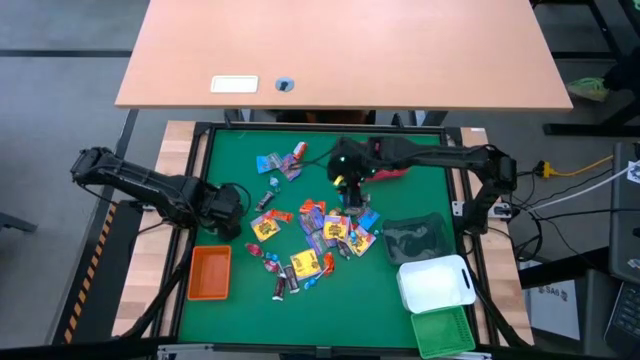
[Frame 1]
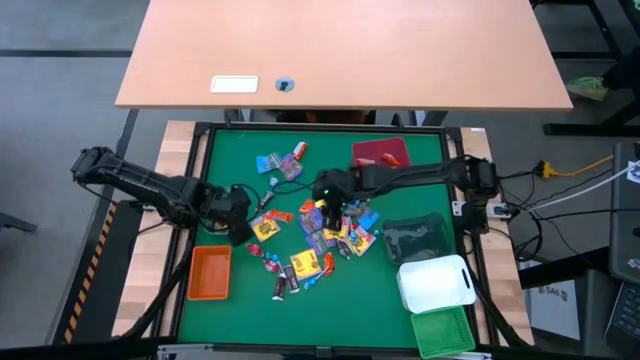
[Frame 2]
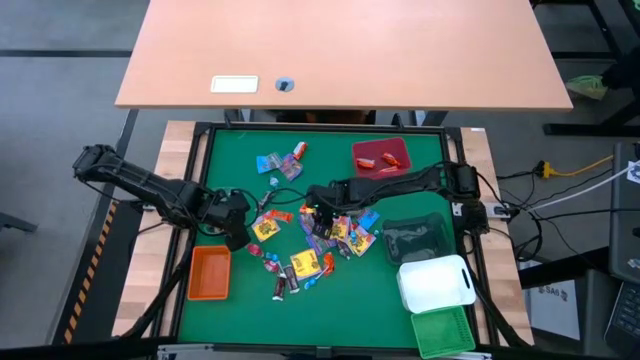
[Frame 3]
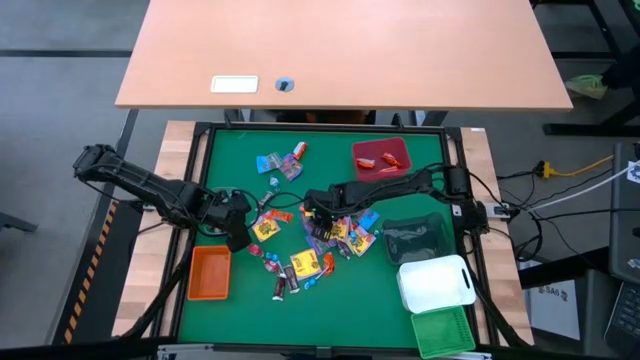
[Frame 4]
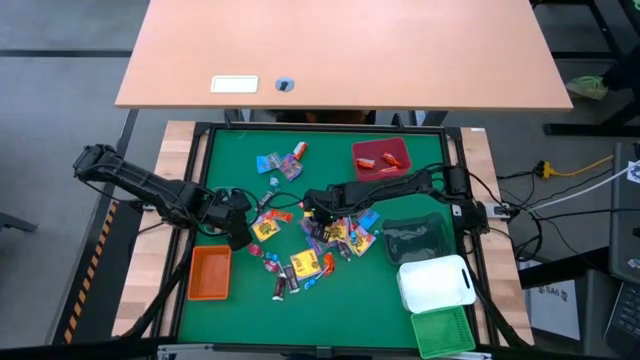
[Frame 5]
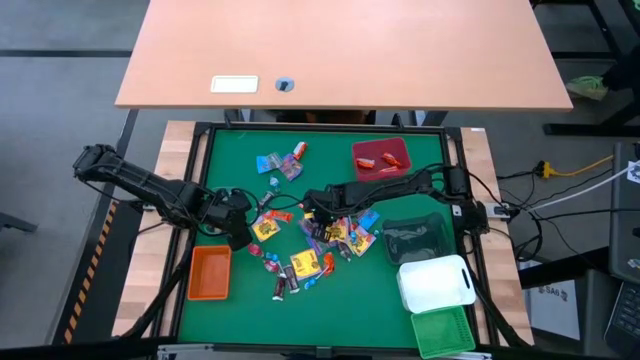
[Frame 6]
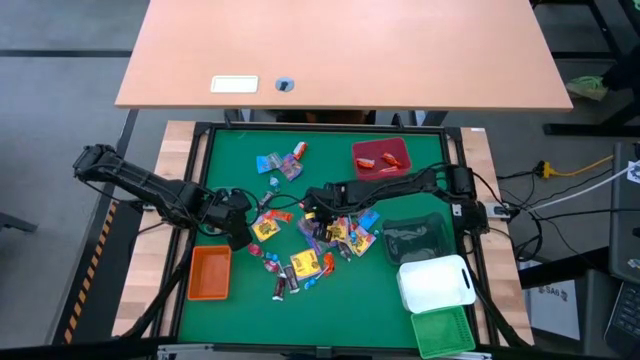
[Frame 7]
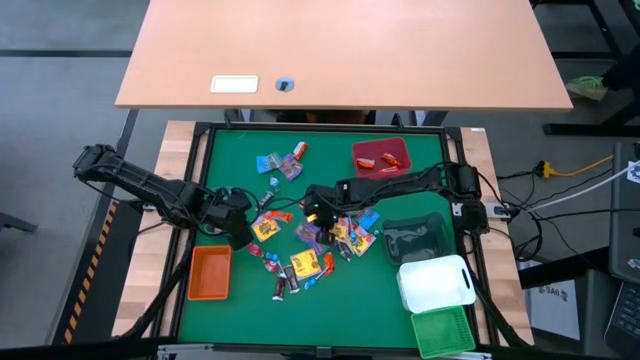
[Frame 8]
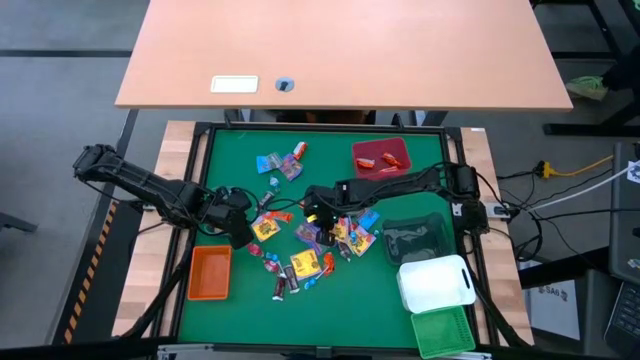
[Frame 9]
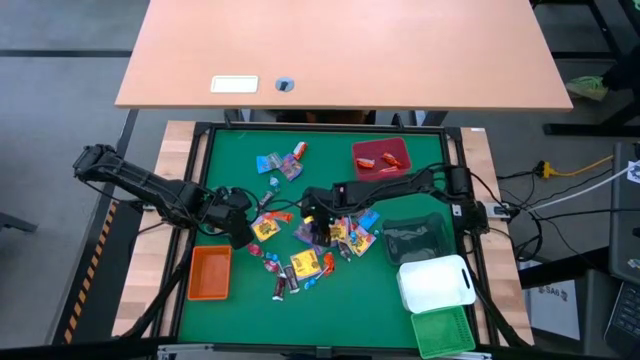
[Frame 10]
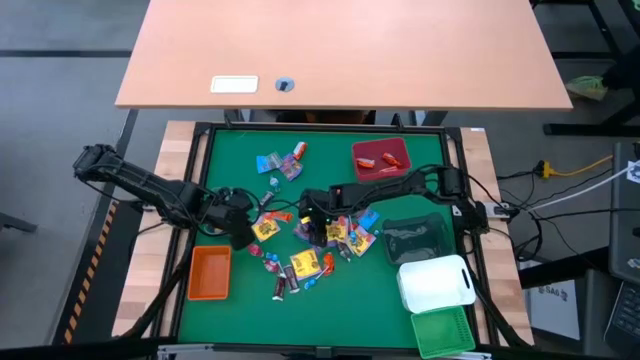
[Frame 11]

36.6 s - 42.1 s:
Task: Sort candy
Put the violet candy into the black bin

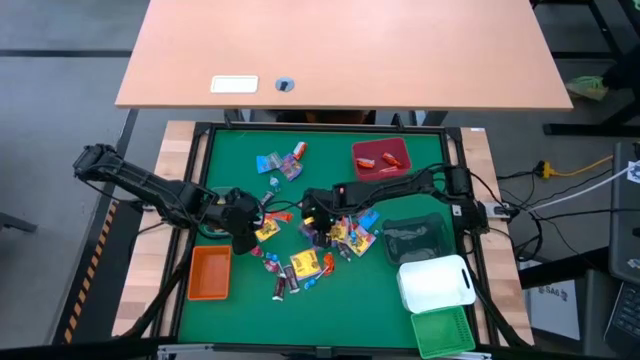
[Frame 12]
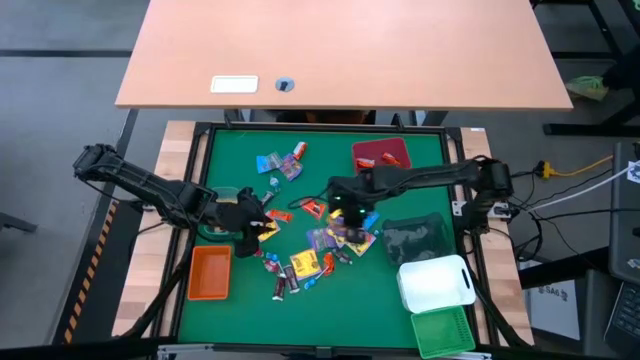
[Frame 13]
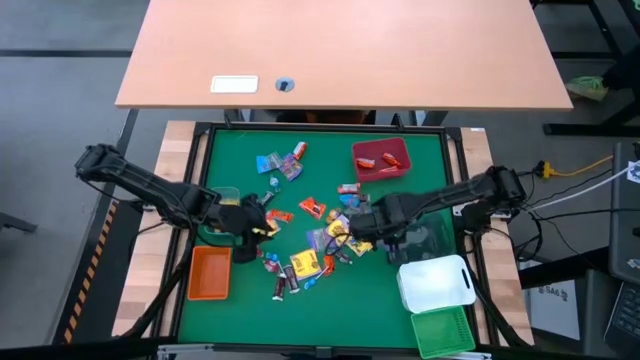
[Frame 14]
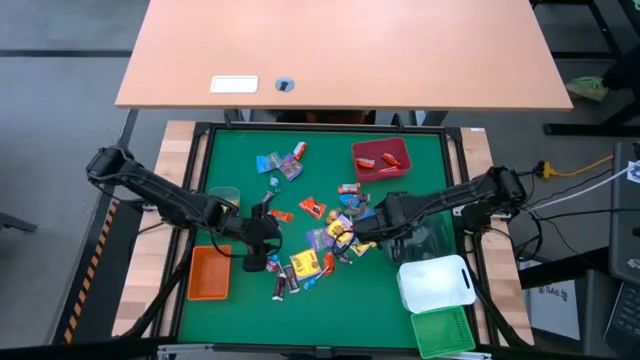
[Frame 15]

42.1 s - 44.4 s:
Put the violet candy into the black bin

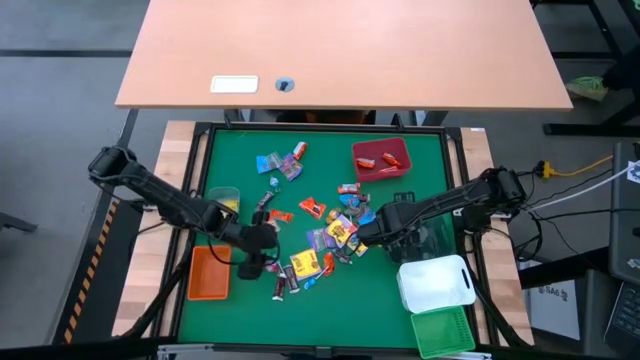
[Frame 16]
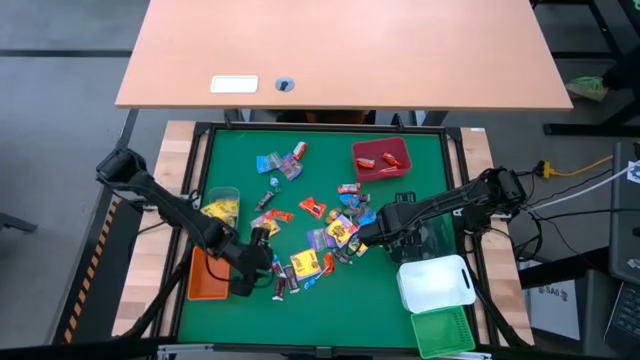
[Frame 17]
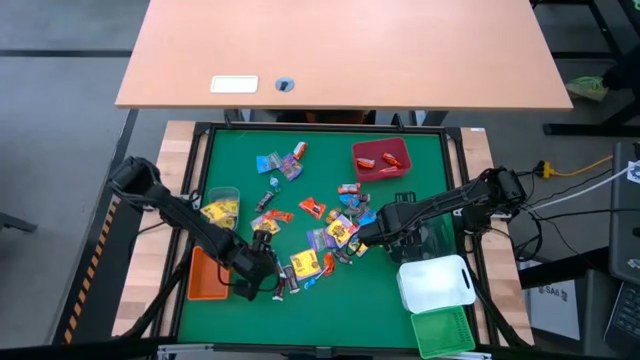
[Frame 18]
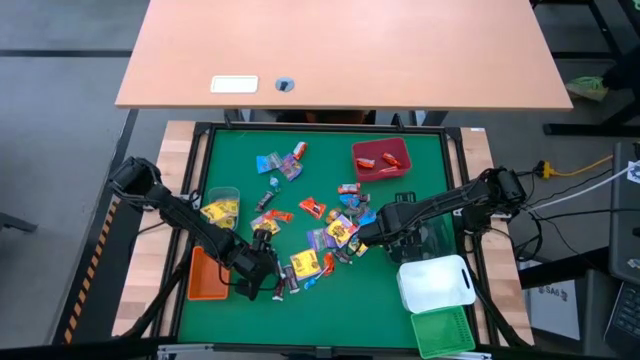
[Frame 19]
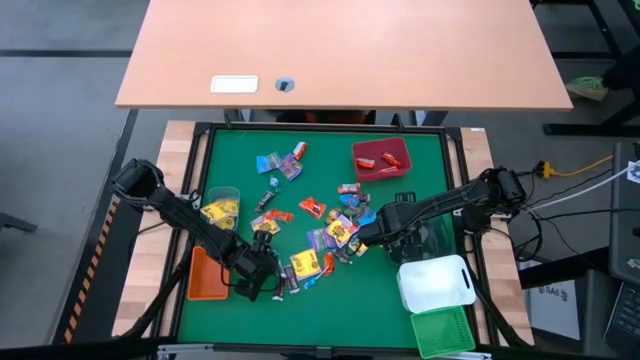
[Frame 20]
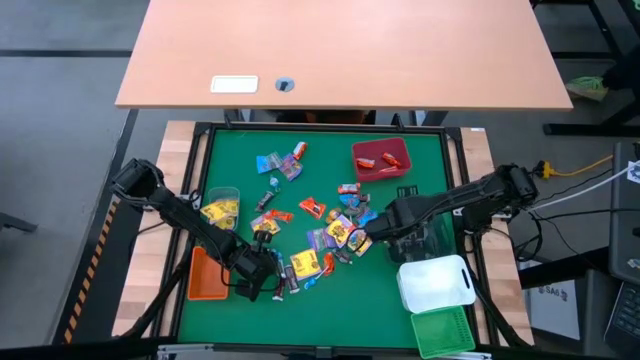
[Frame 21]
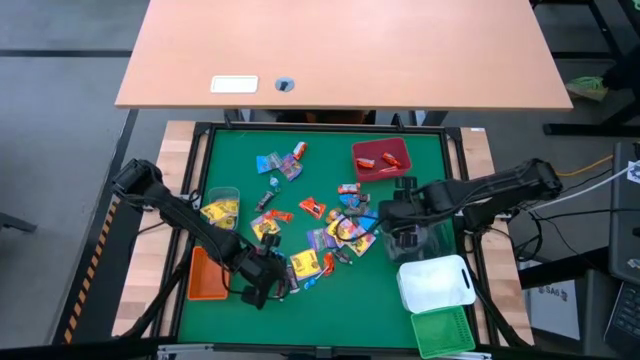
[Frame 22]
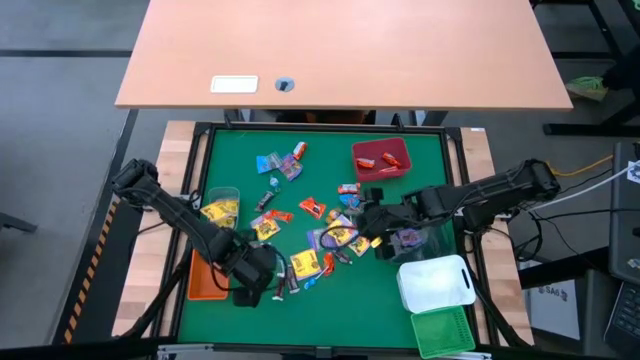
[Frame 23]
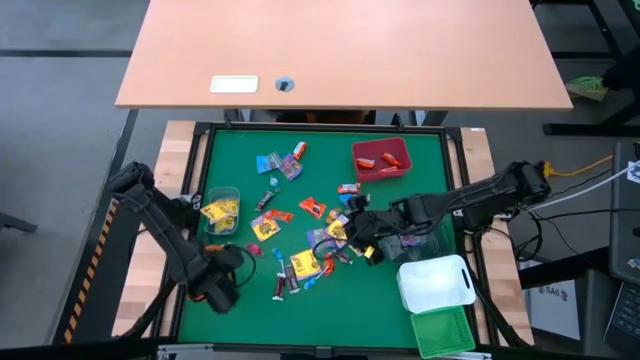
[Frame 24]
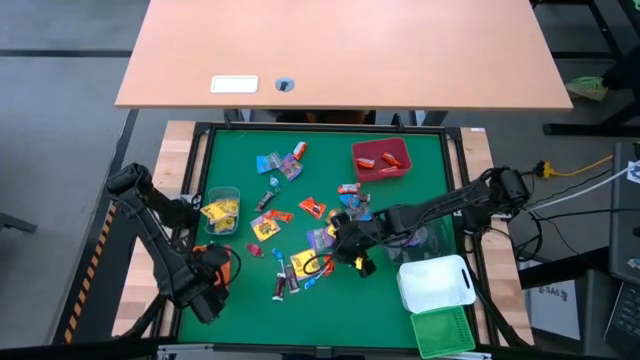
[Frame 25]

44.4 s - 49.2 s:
Put the pink candy into the orange bin

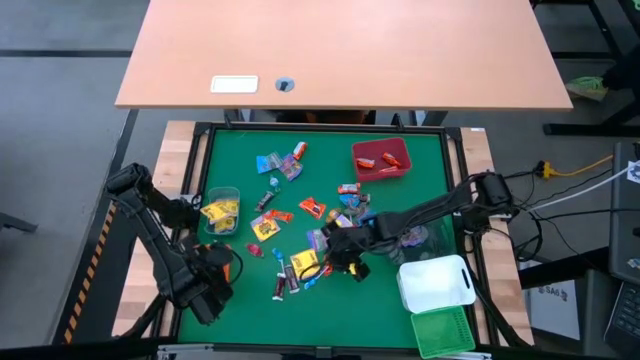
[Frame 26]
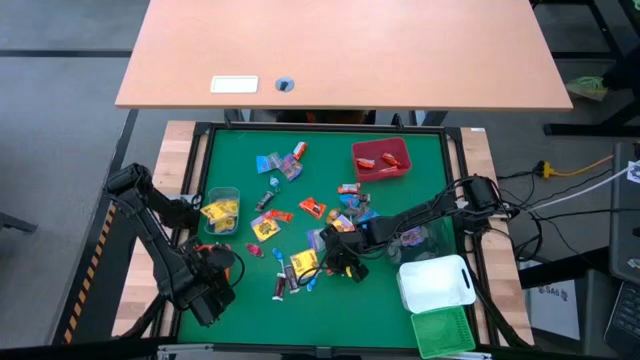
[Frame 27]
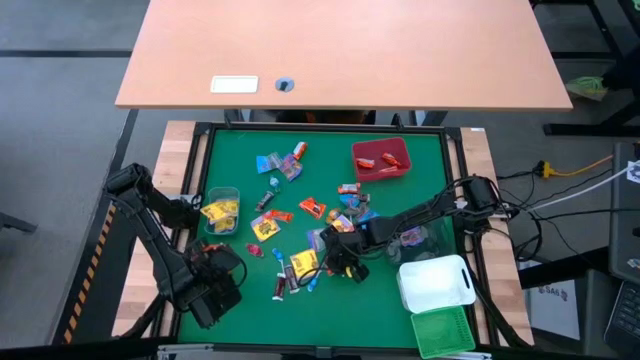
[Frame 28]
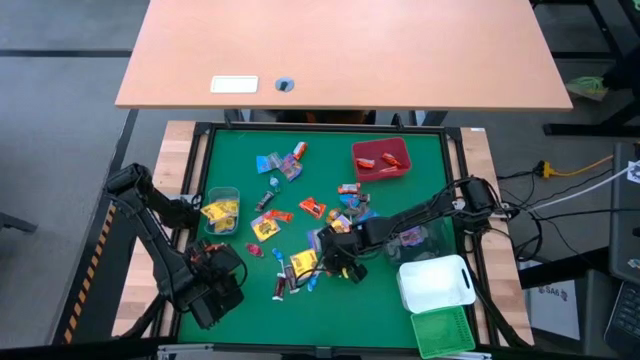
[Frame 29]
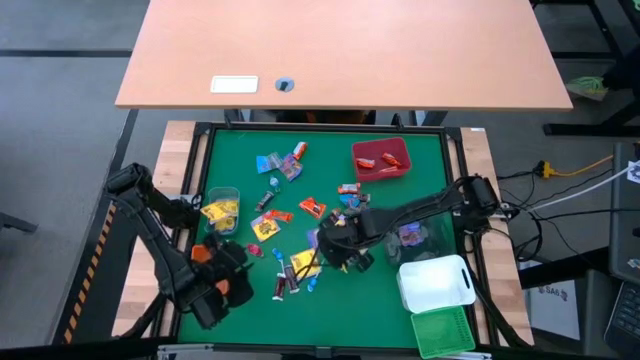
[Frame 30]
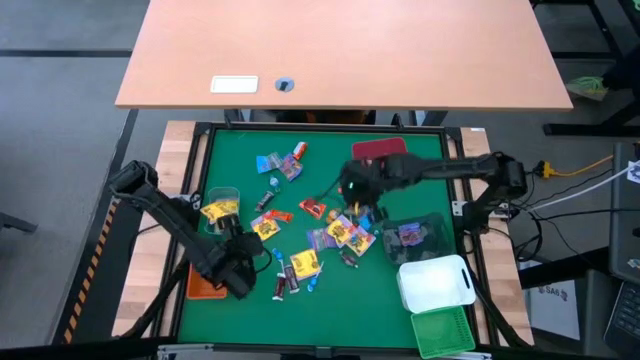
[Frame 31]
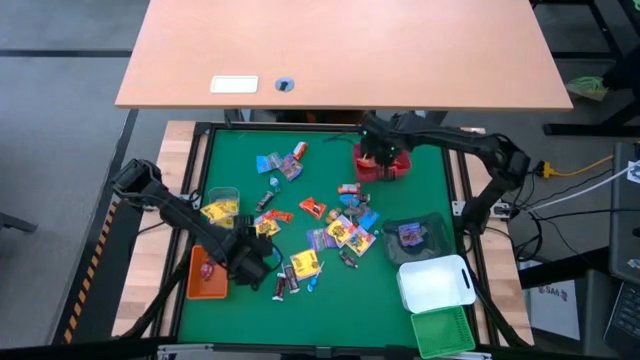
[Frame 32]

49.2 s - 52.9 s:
Put the orange chocolate bar into the red bin

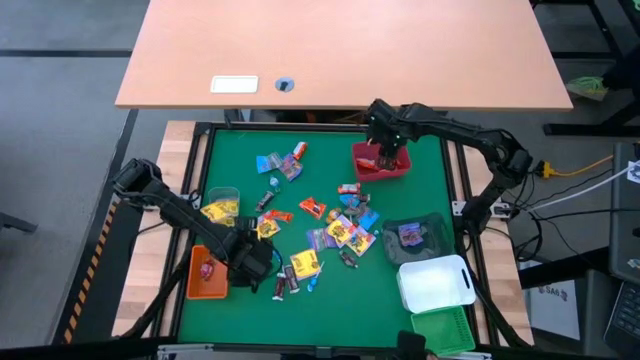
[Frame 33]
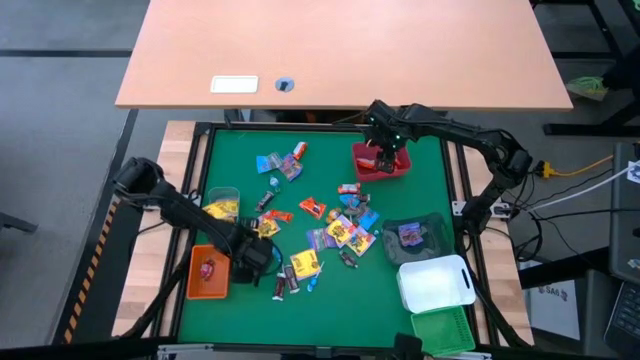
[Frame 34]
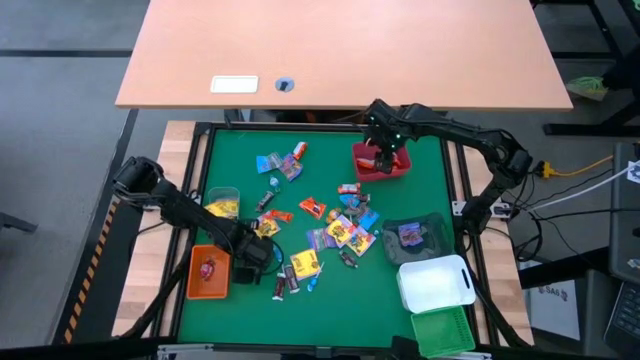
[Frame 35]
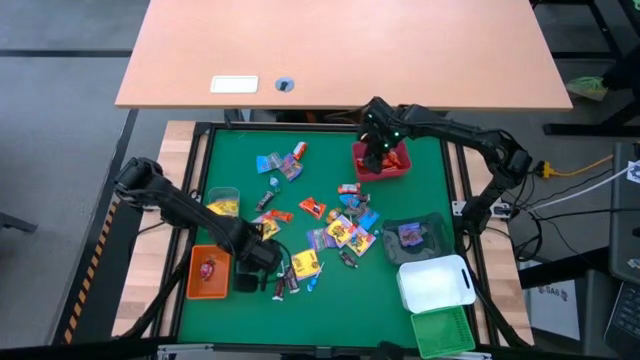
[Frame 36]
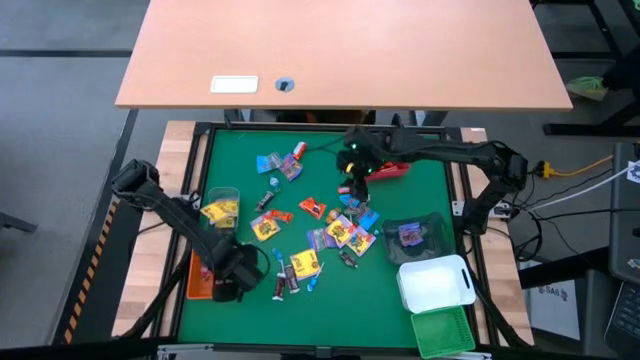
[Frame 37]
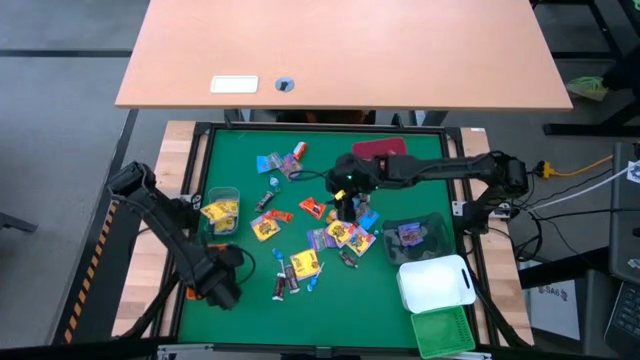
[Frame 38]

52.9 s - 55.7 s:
Put the pink candy into the orange bin

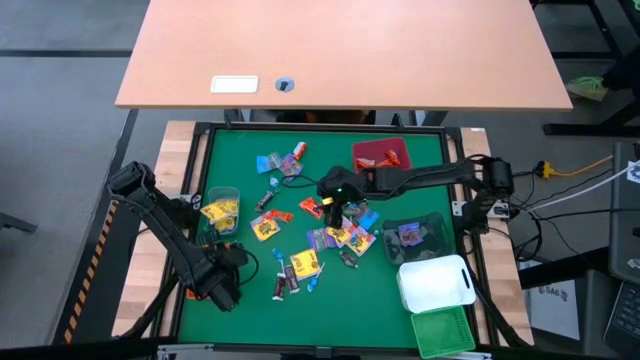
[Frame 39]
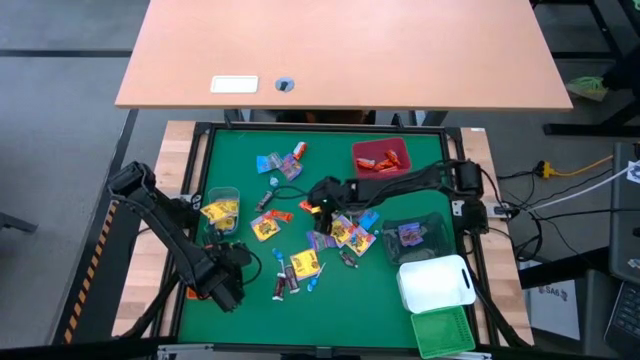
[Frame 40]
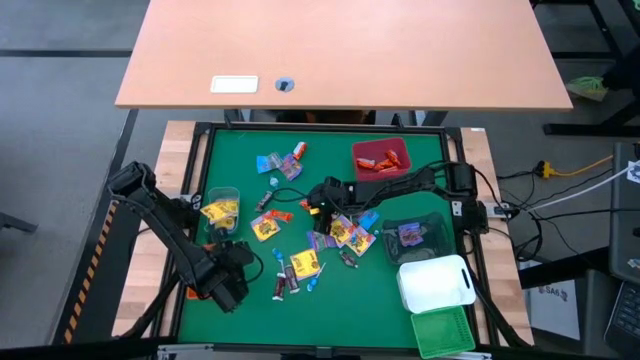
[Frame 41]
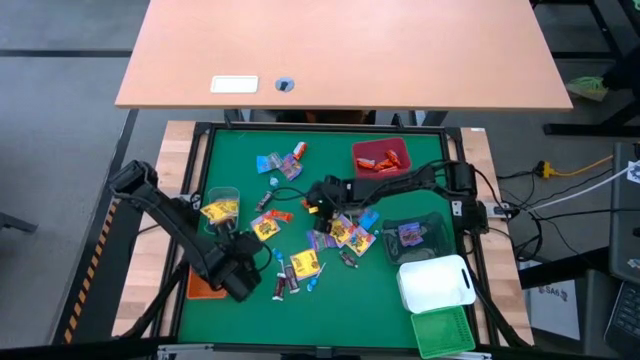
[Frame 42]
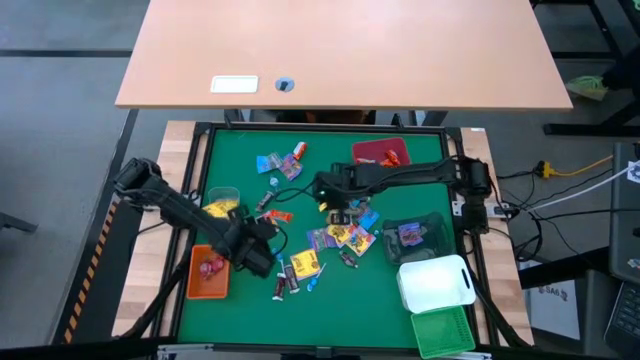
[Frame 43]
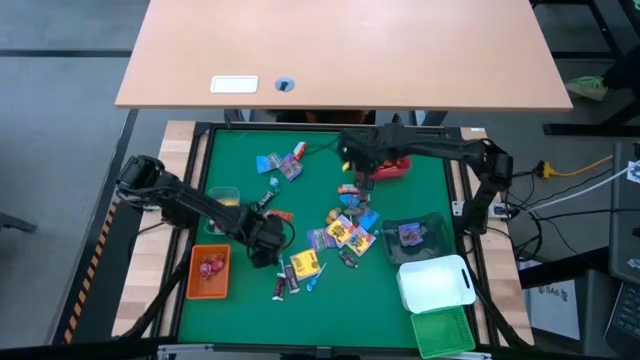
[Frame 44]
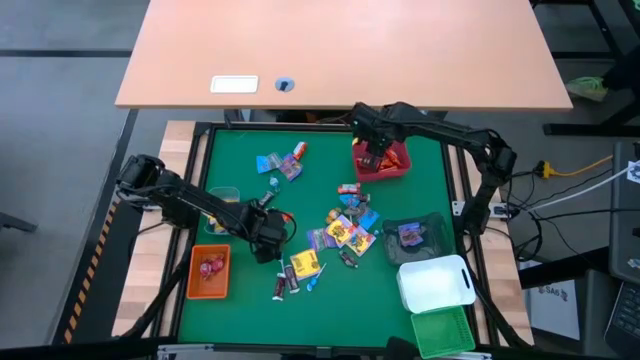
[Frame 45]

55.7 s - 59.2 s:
Put the orange chocolate bar into the red bin
